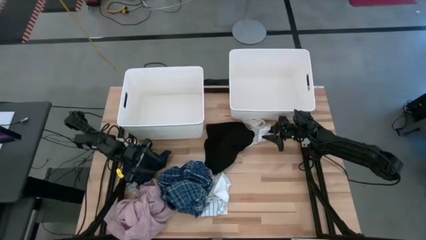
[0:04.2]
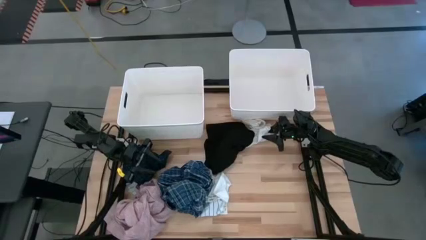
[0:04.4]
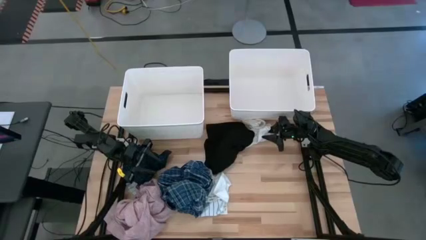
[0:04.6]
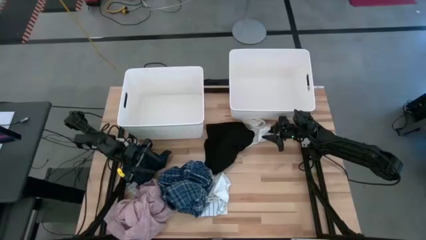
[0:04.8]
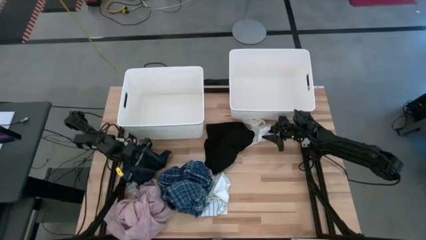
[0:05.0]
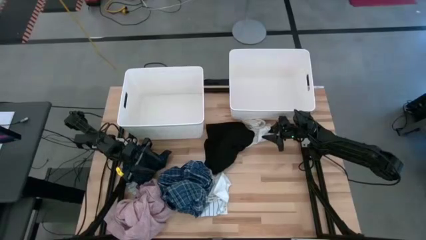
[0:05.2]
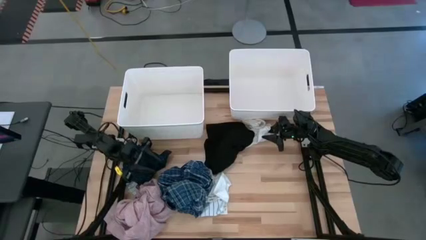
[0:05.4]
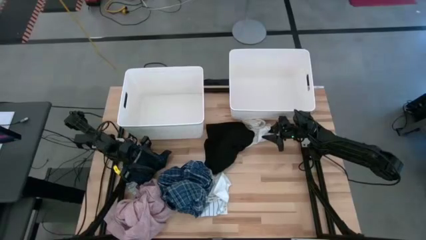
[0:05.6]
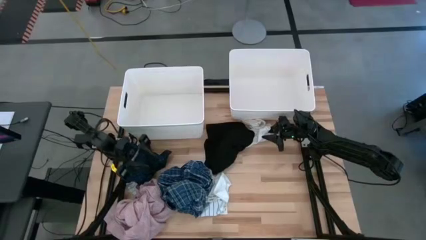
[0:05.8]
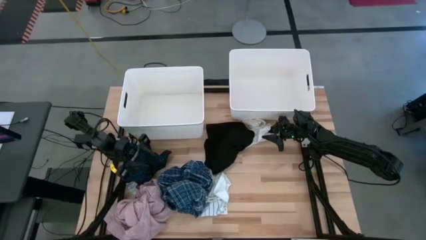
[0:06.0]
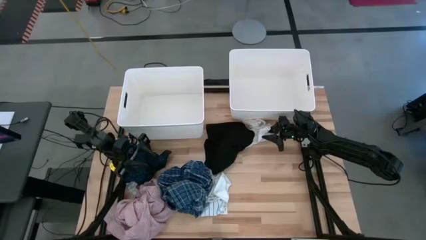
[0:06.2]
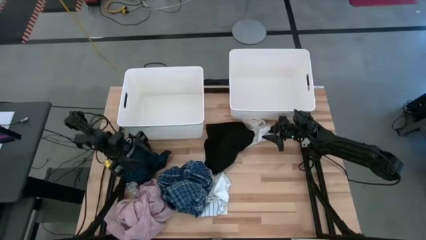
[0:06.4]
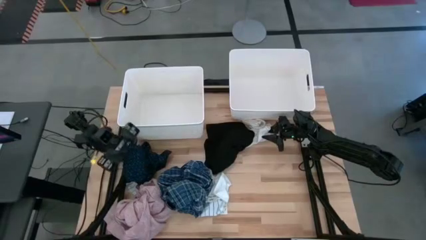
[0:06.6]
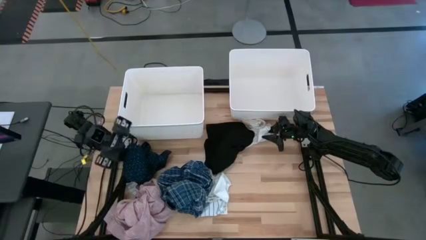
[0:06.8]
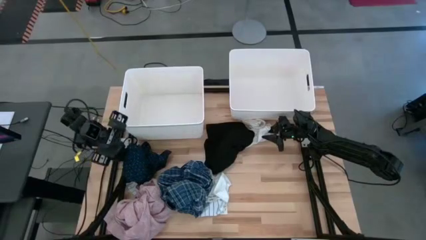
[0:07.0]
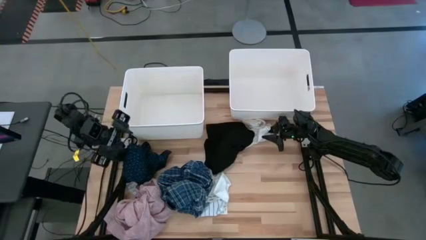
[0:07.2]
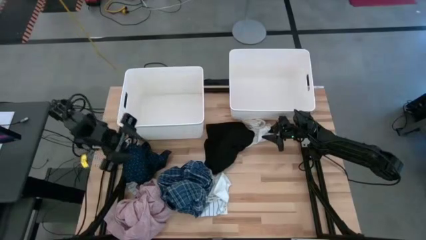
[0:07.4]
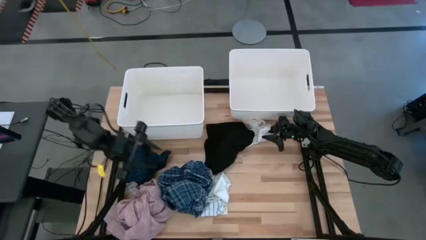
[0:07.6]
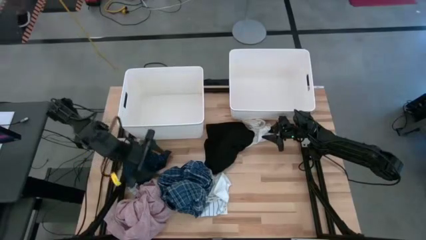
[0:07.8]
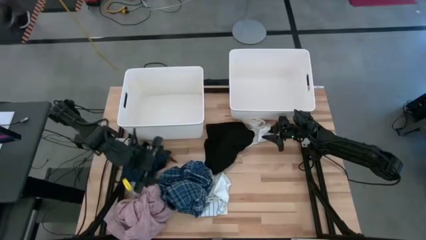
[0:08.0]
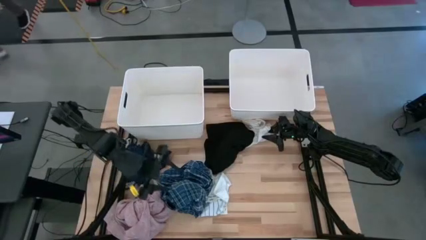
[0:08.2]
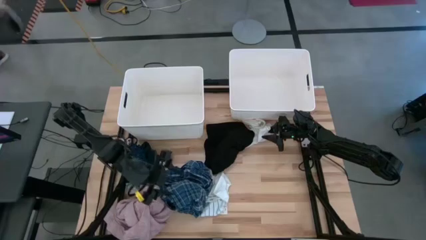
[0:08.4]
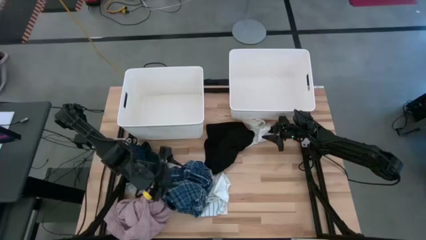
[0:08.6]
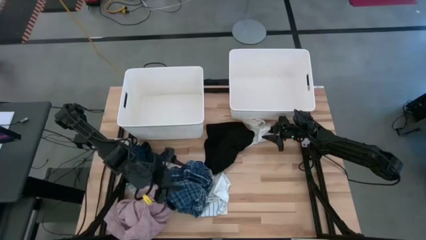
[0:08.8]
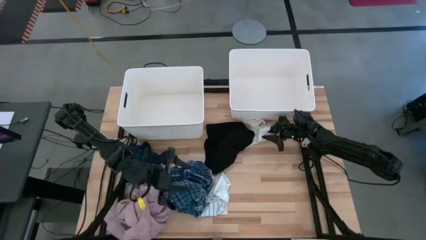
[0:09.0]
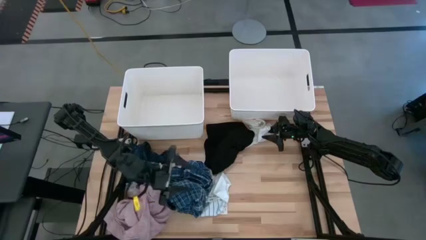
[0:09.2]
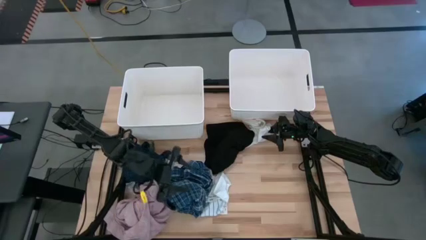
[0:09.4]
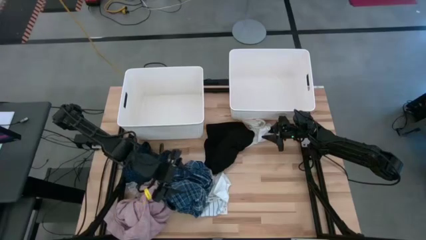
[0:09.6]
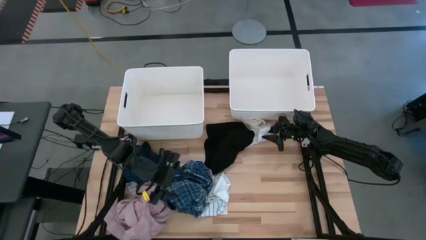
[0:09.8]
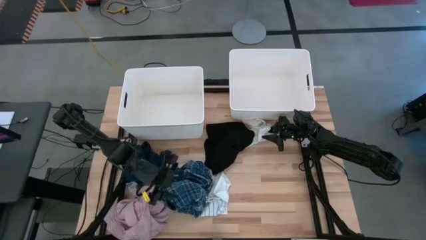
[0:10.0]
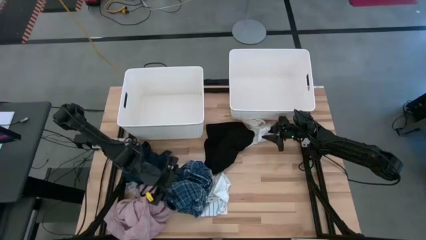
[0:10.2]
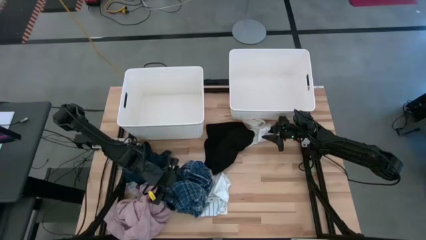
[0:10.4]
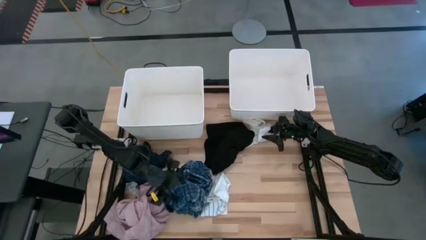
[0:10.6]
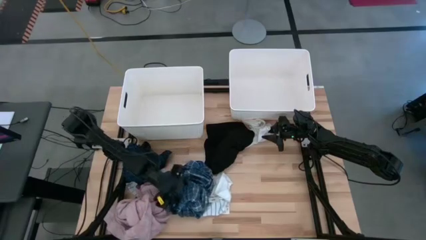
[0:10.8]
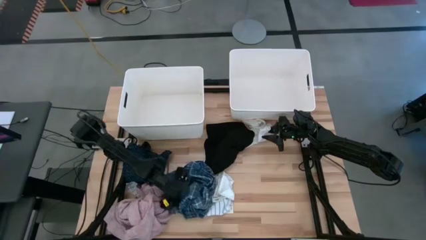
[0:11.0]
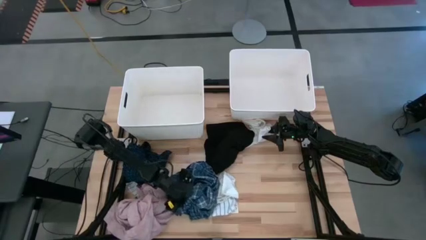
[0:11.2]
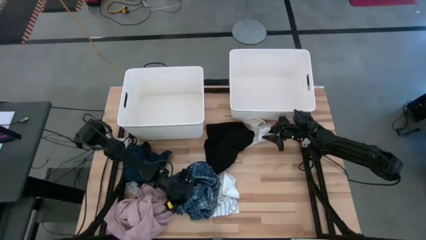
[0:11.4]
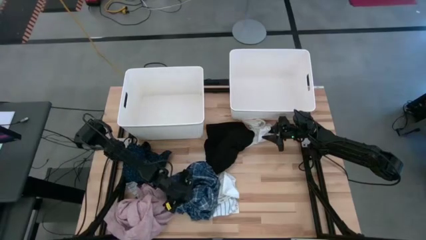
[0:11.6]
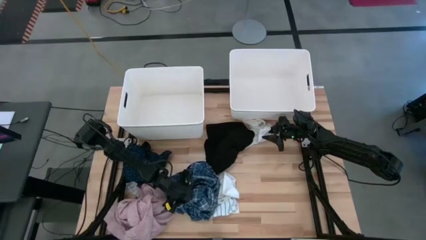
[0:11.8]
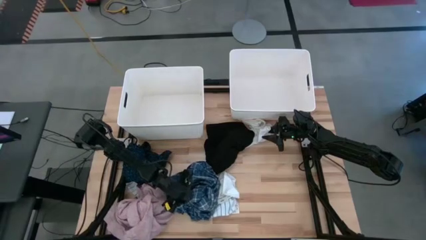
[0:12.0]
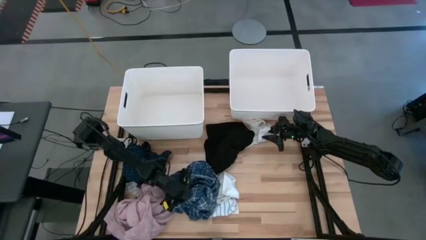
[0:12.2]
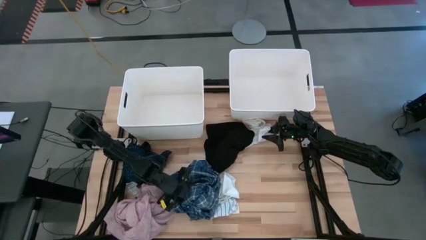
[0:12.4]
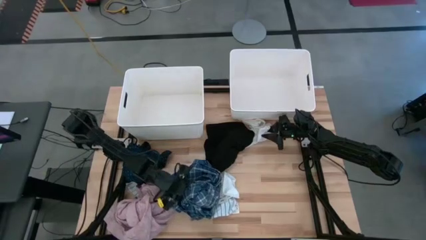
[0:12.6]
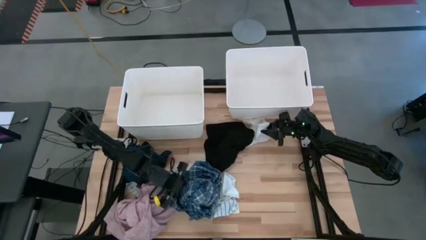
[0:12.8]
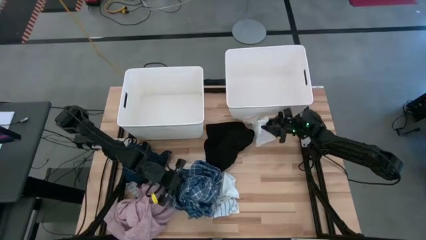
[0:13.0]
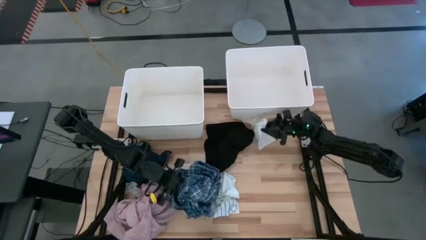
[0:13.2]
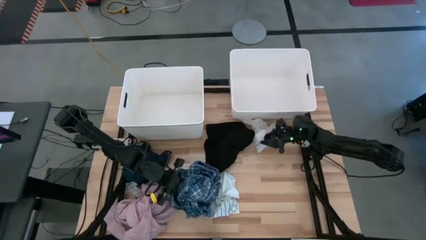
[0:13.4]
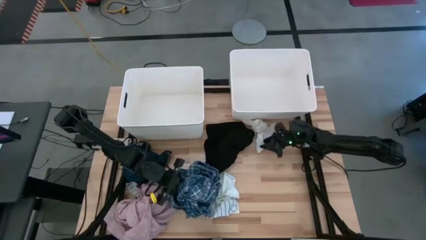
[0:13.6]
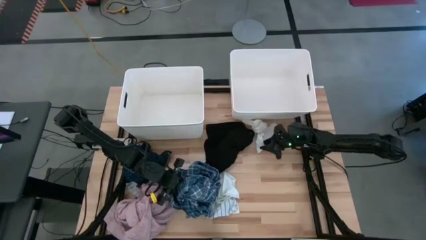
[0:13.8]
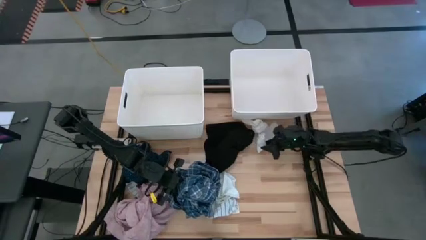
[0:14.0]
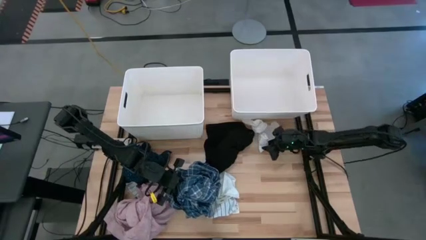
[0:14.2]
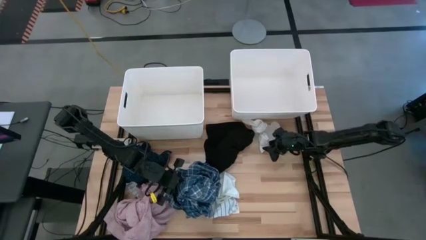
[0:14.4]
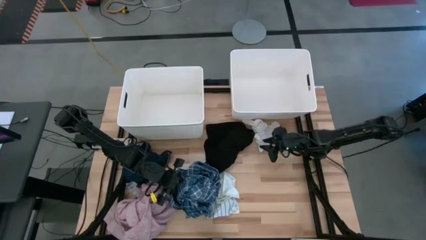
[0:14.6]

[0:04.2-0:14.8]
Task: Sort clothes
Put the blue patterned polo shirt into the left laundry bin
